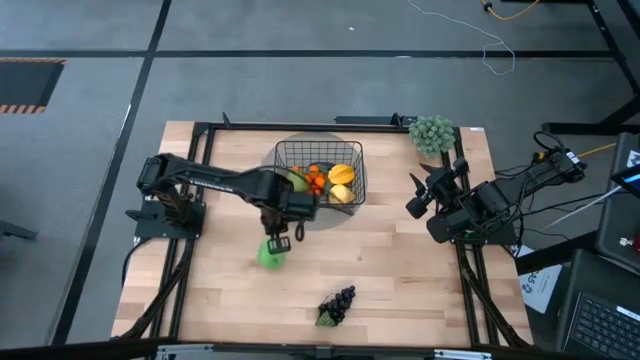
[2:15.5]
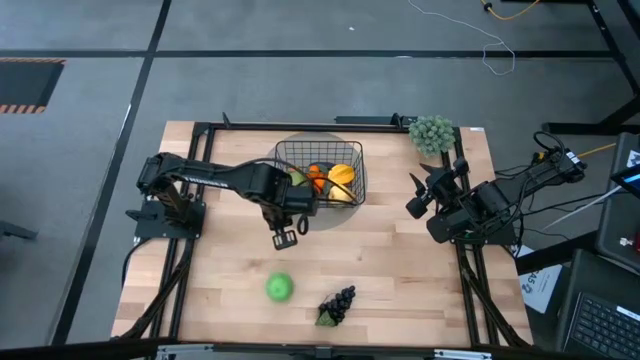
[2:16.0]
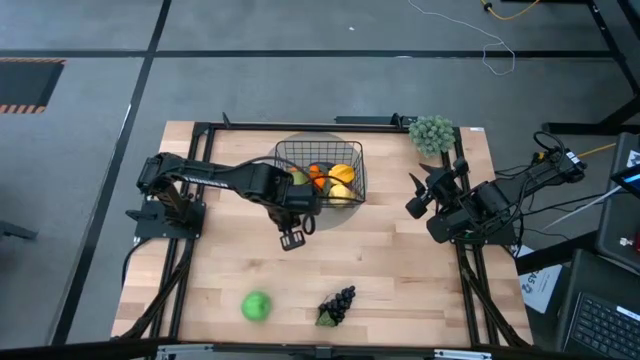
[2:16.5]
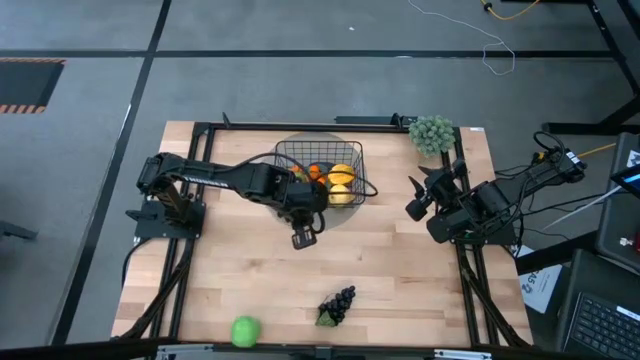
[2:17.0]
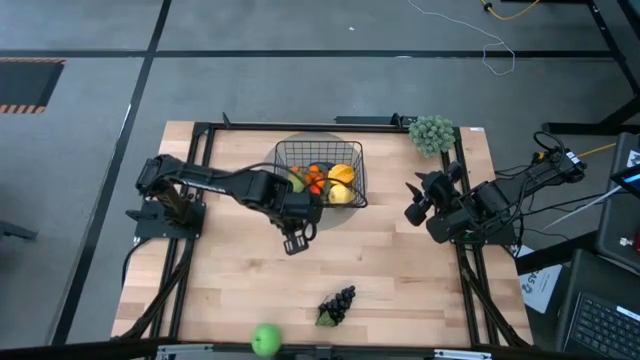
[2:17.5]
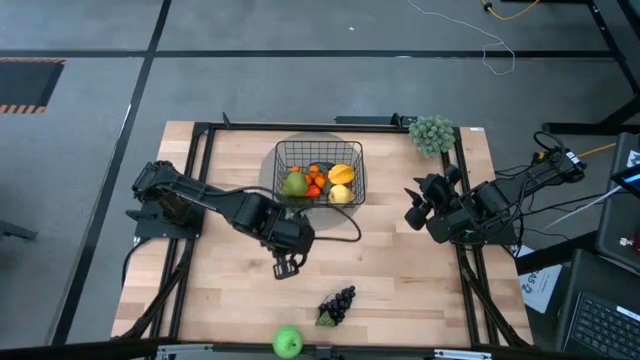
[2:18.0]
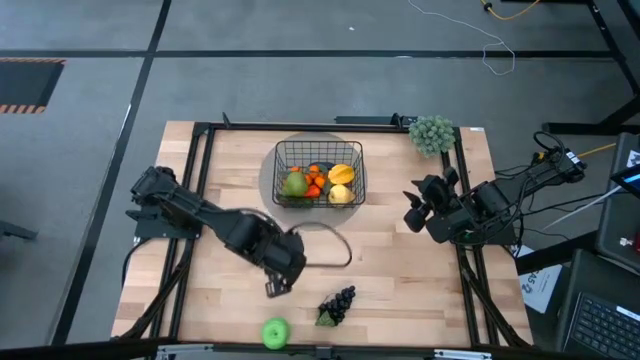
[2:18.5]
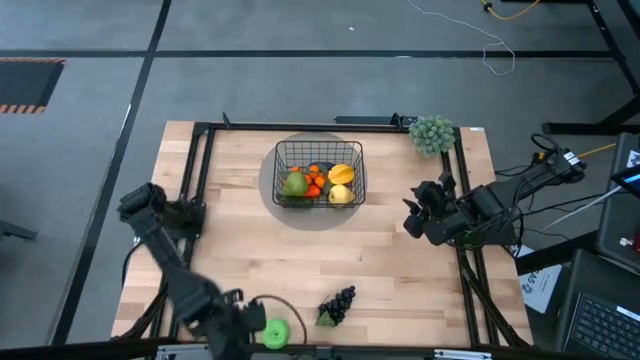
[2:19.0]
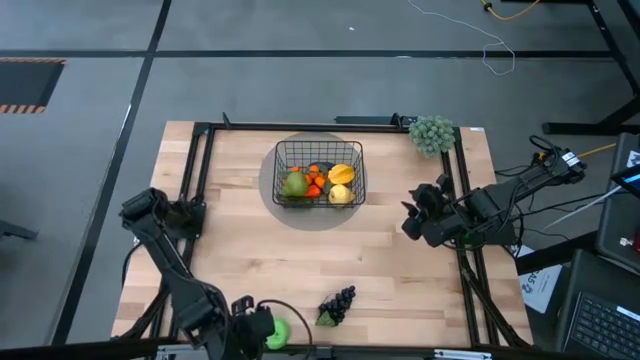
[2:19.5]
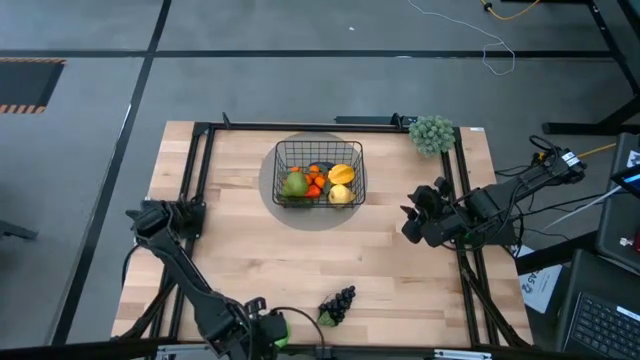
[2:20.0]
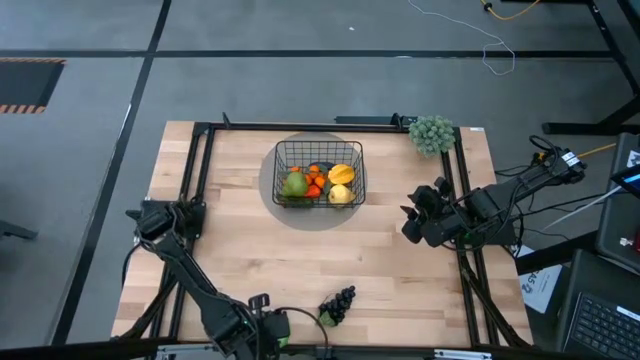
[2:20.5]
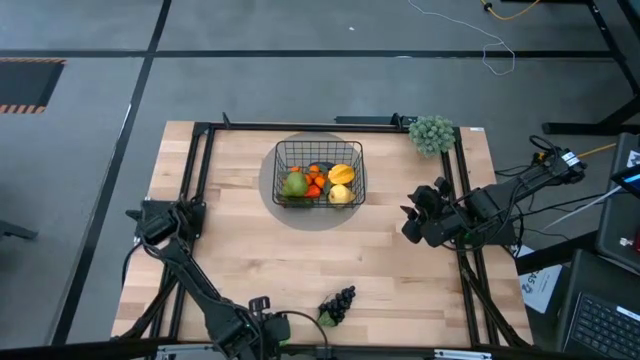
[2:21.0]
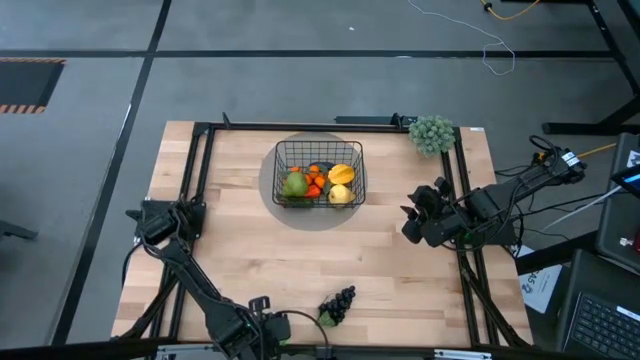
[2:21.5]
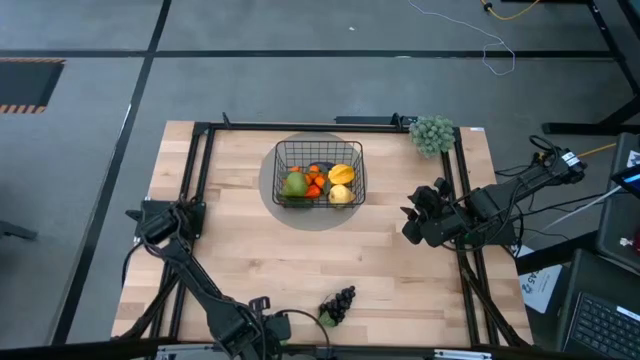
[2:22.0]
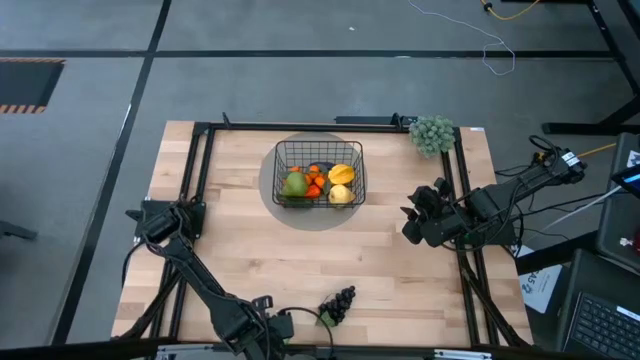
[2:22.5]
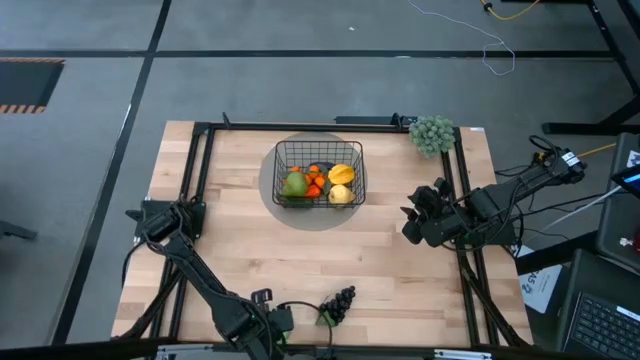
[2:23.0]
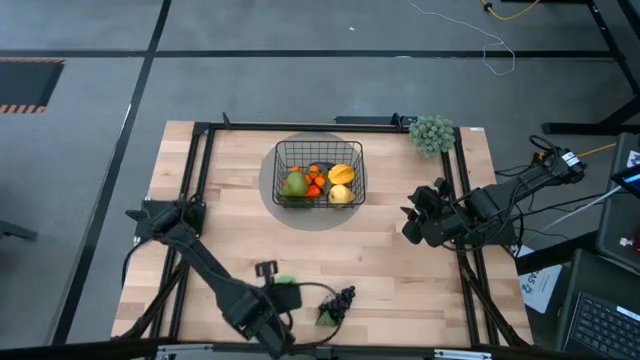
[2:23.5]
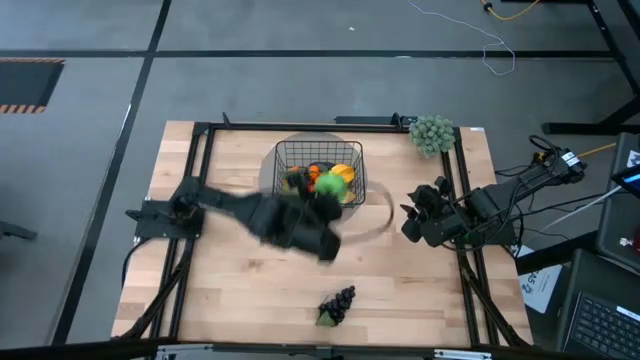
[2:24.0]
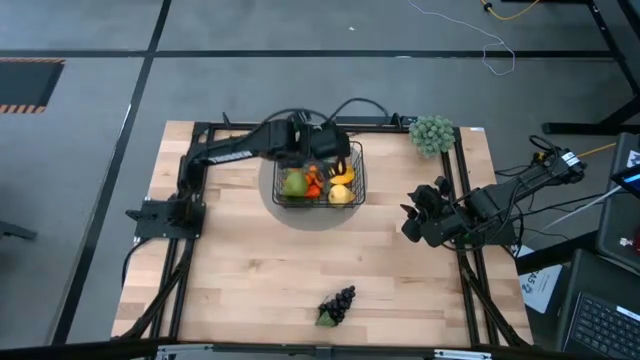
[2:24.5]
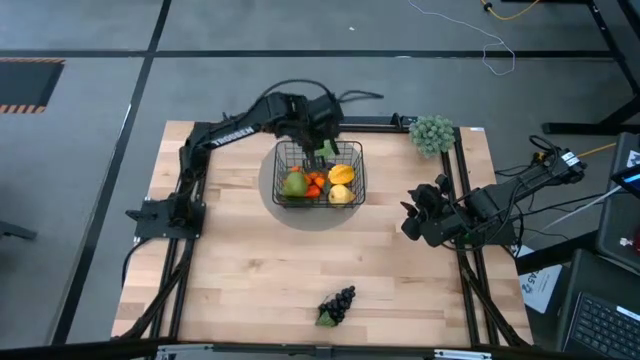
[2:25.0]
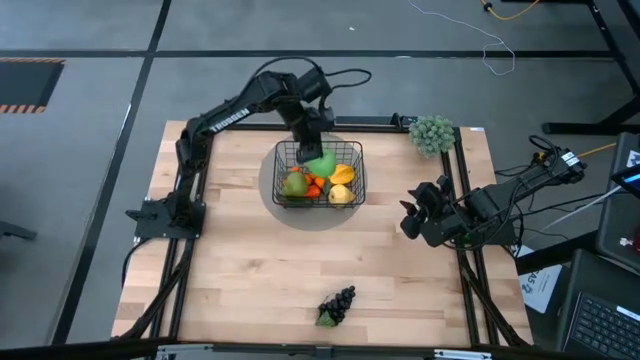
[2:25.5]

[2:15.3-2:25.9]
Task: Build produce basket
Put the green apple into the wire basket

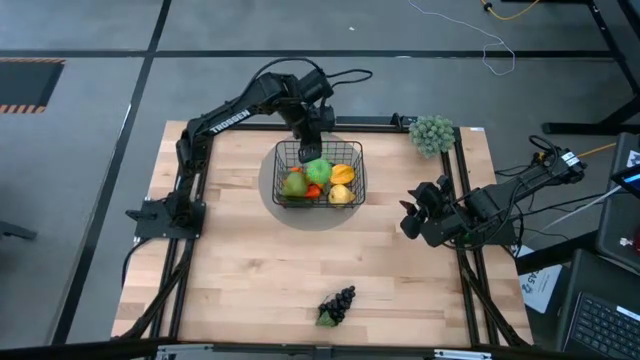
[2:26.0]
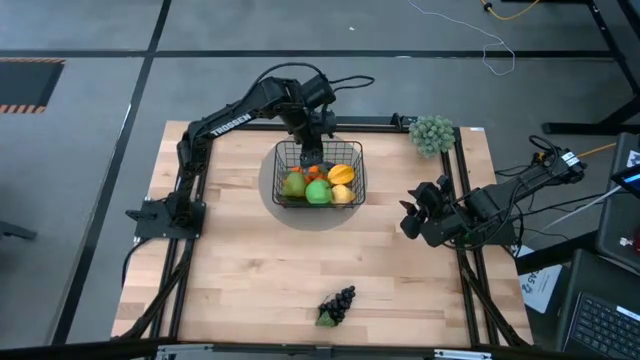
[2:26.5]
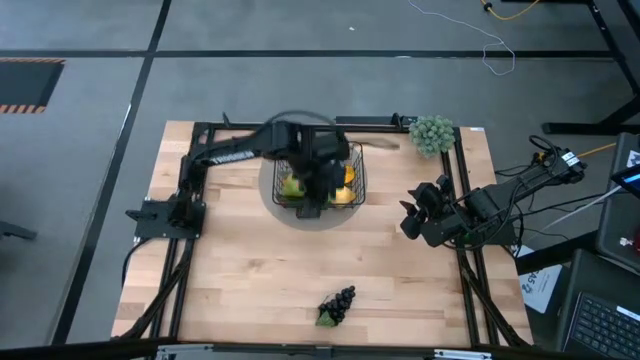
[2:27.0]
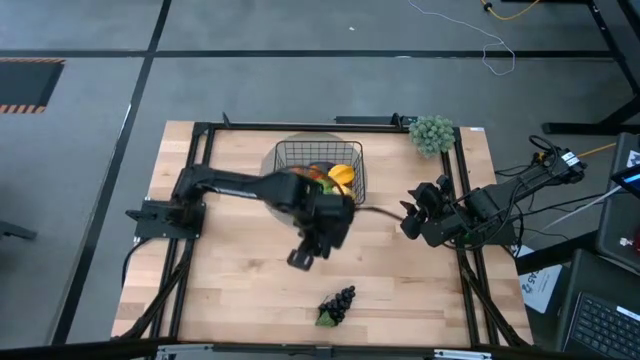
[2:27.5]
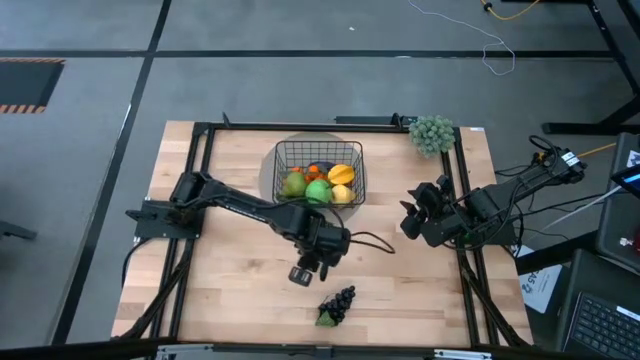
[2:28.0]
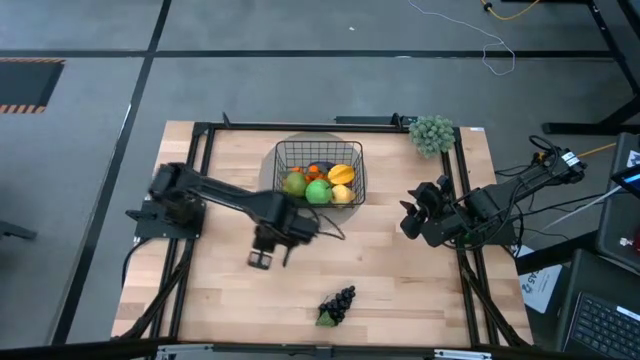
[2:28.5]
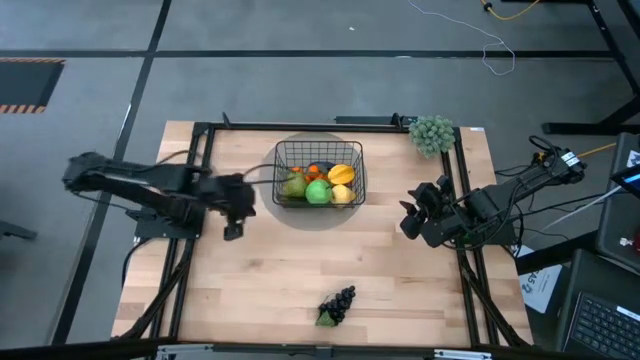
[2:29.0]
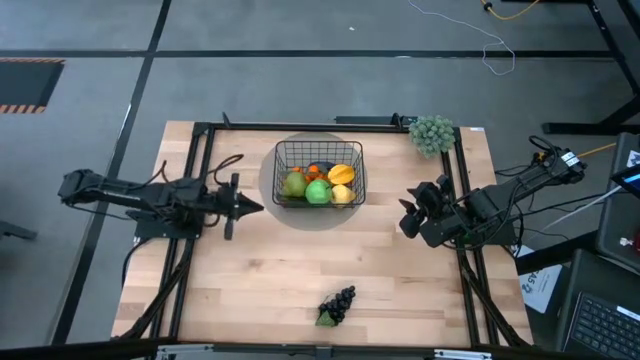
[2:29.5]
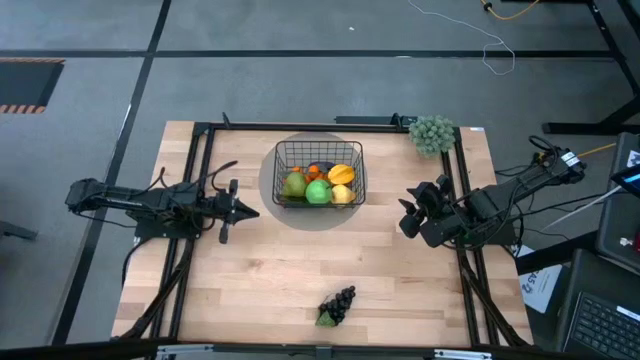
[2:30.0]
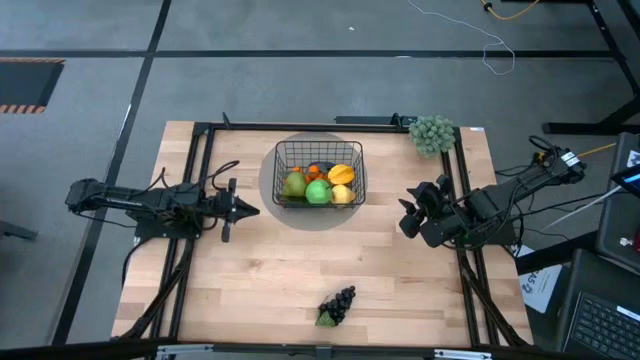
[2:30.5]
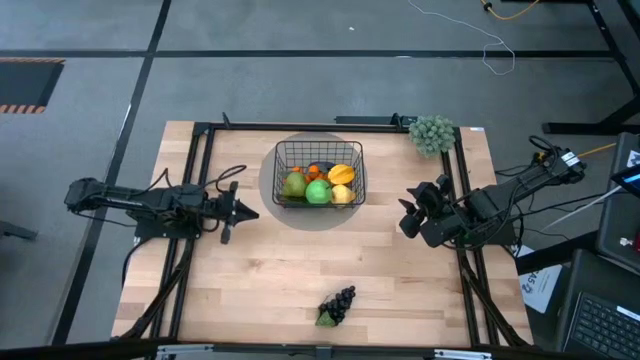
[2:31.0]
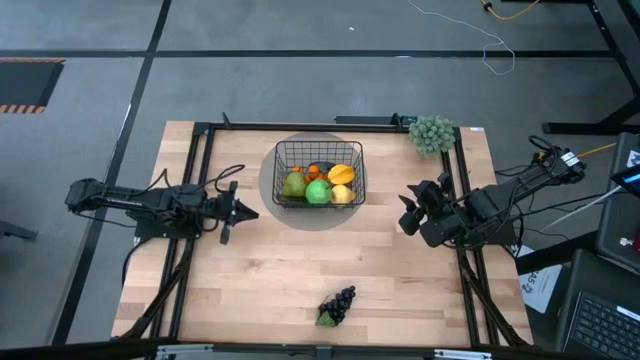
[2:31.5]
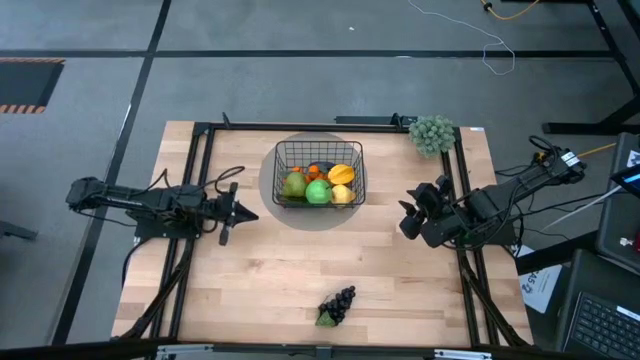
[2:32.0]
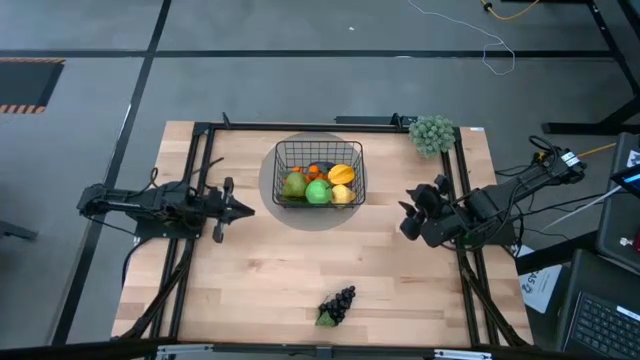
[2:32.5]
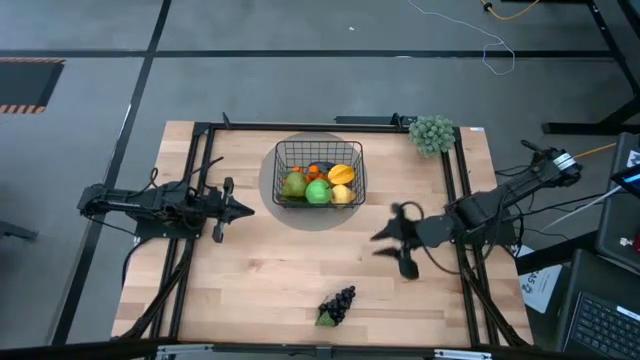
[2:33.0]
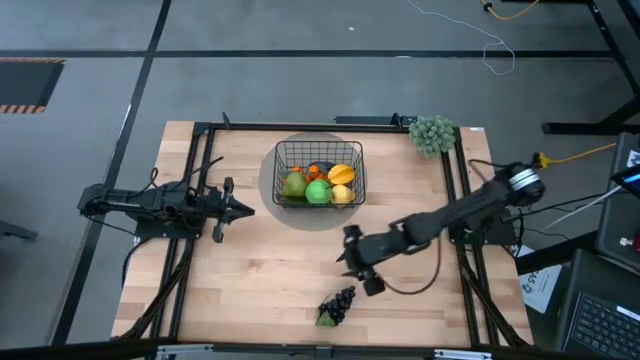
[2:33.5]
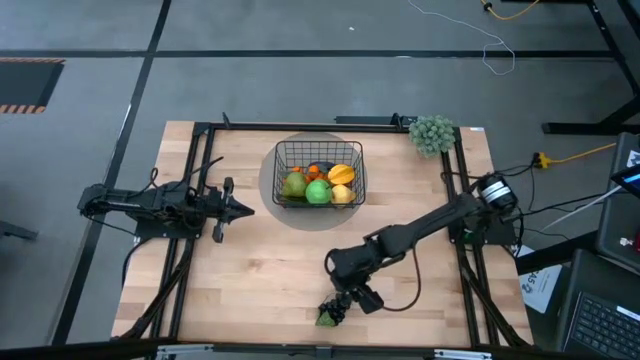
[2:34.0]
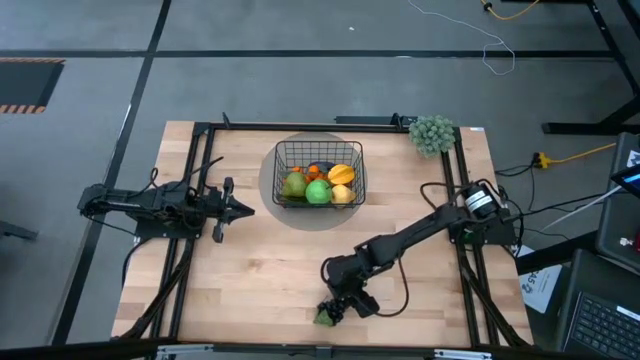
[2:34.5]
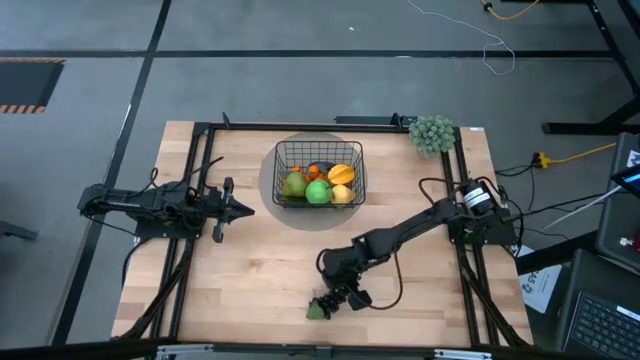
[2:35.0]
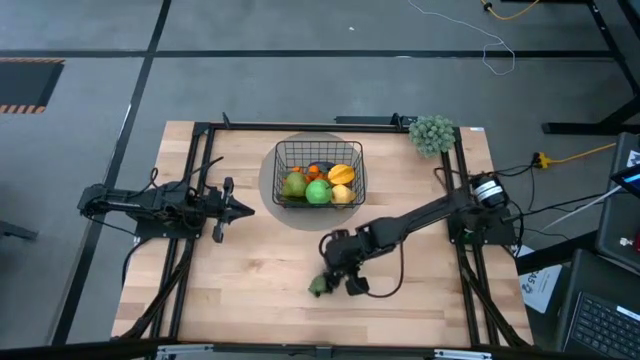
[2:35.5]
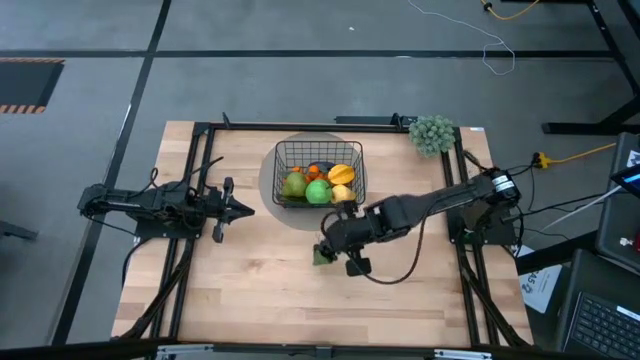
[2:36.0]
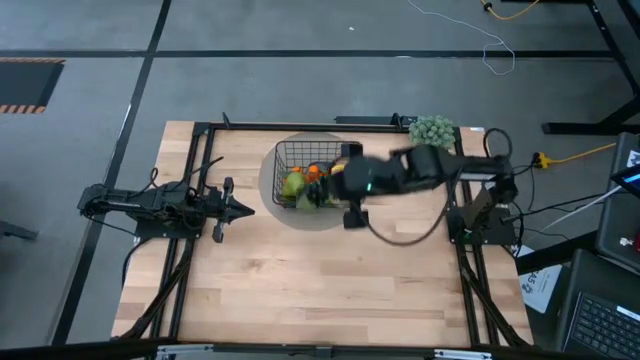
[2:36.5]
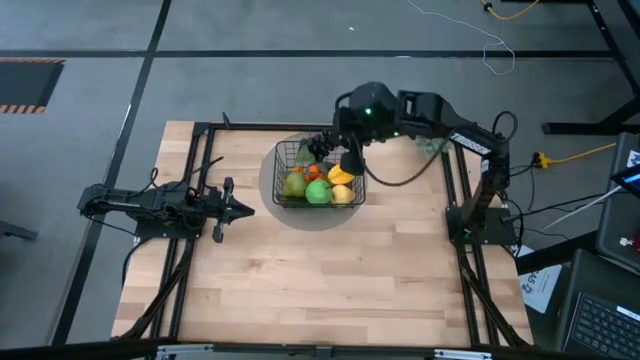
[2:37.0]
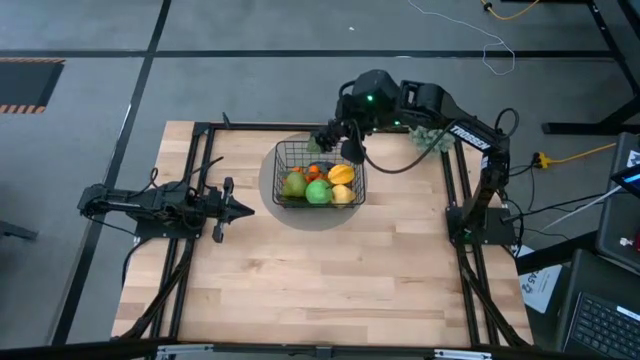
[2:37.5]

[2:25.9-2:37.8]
Put the black grapes into the wire basket
